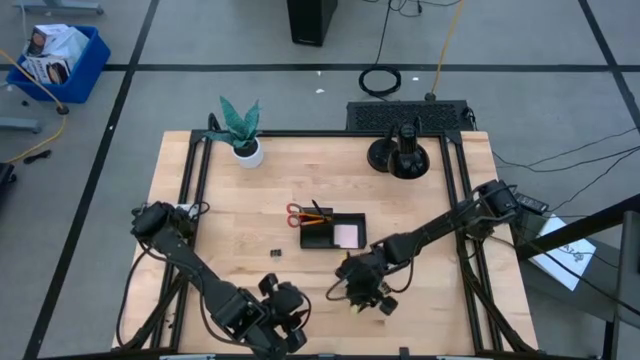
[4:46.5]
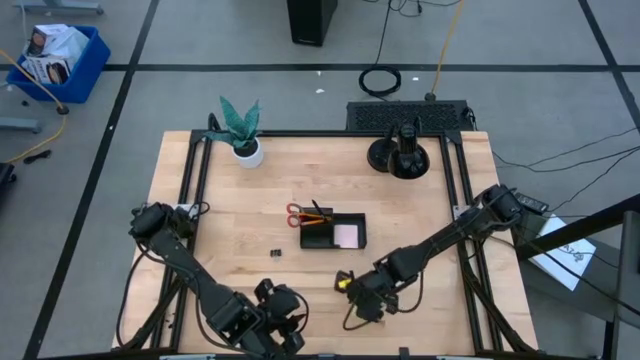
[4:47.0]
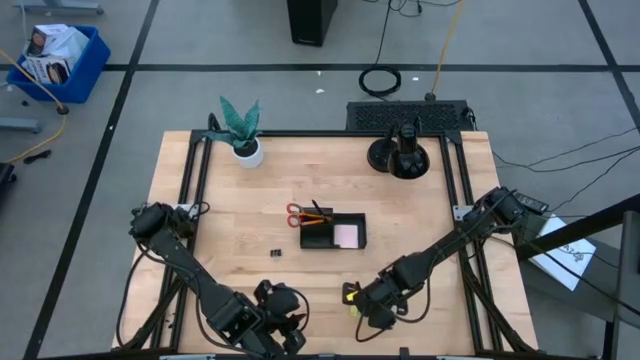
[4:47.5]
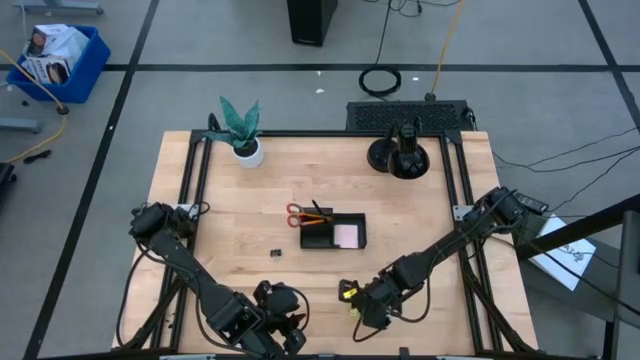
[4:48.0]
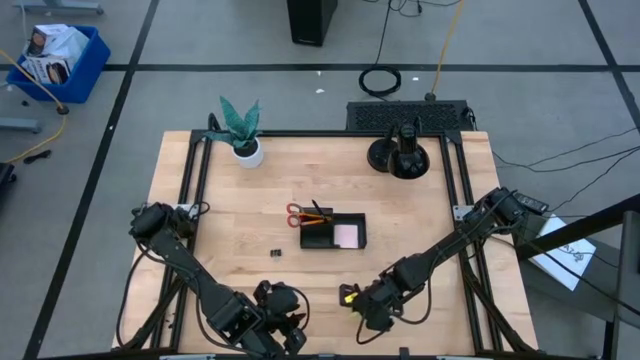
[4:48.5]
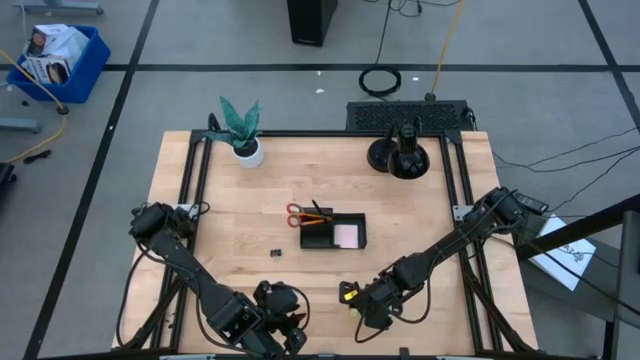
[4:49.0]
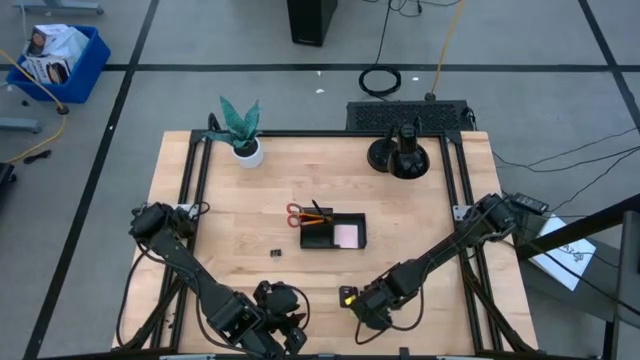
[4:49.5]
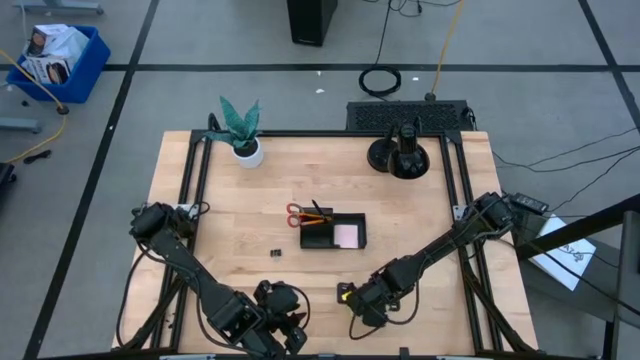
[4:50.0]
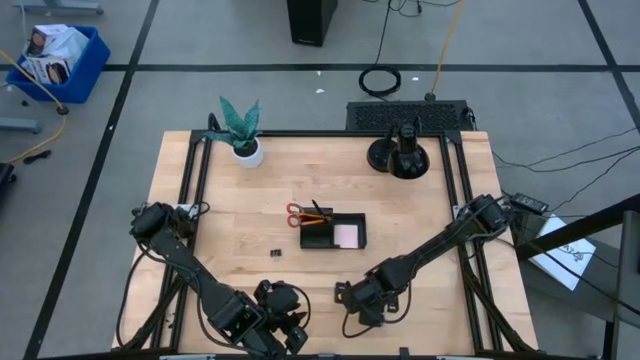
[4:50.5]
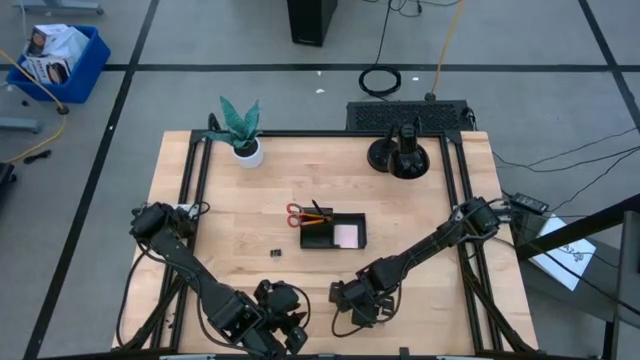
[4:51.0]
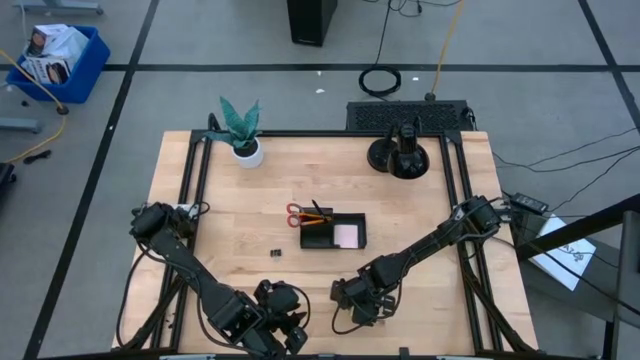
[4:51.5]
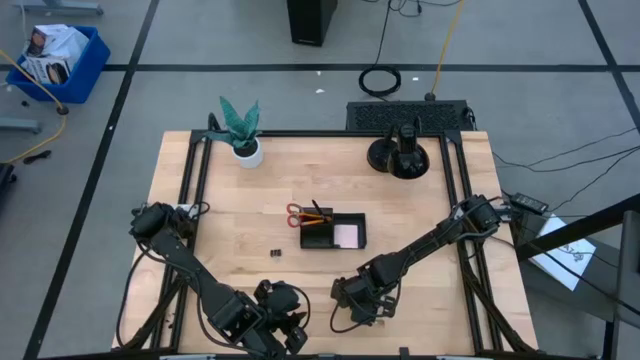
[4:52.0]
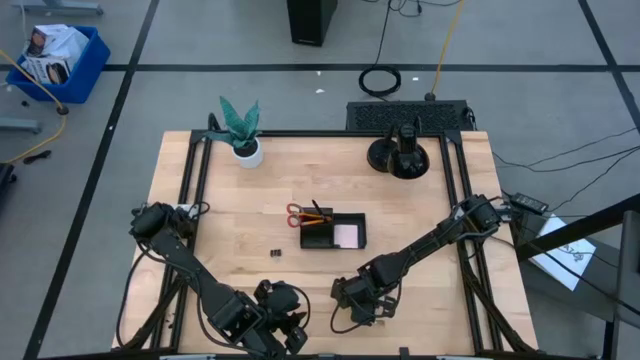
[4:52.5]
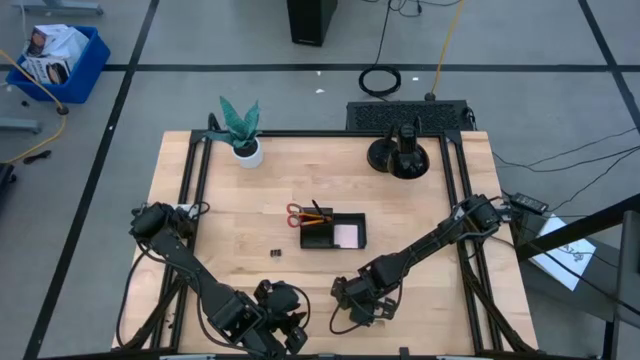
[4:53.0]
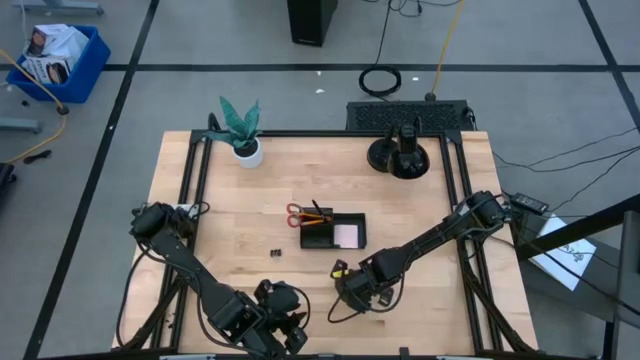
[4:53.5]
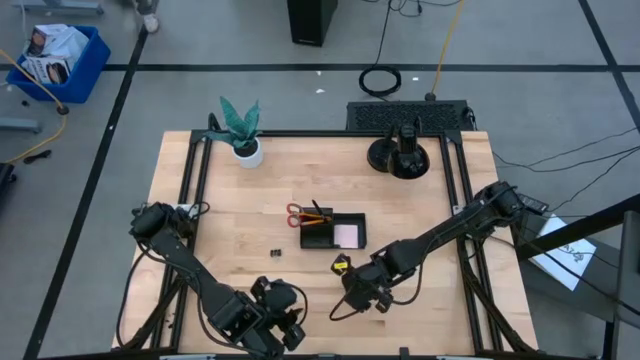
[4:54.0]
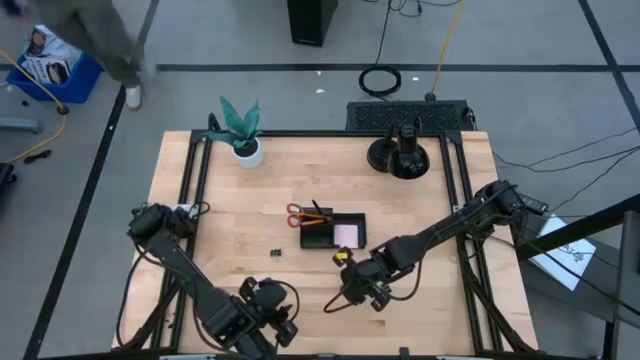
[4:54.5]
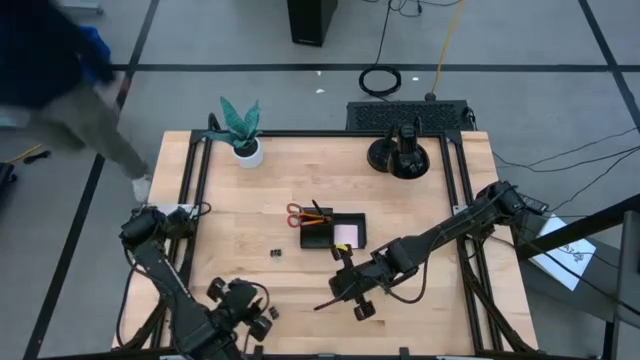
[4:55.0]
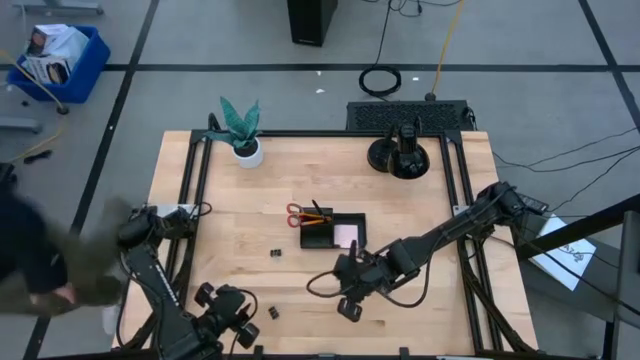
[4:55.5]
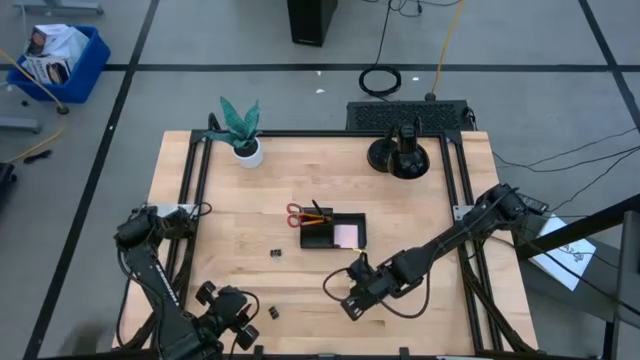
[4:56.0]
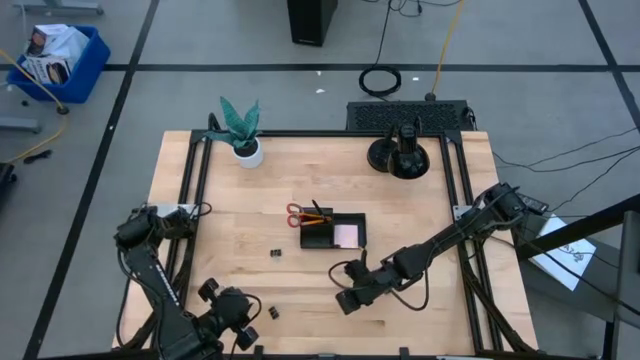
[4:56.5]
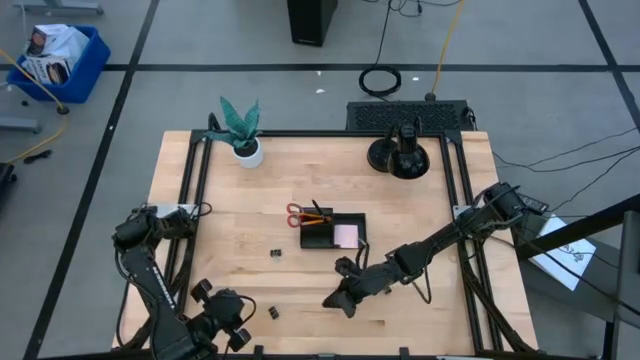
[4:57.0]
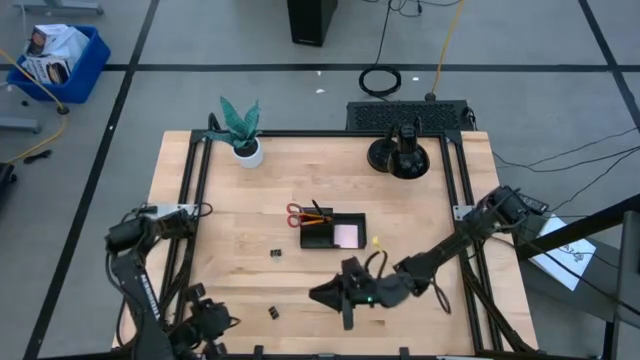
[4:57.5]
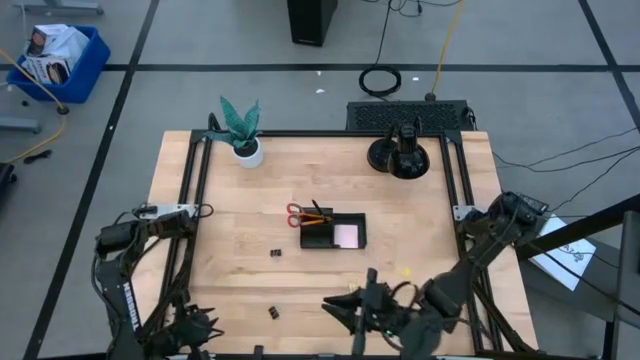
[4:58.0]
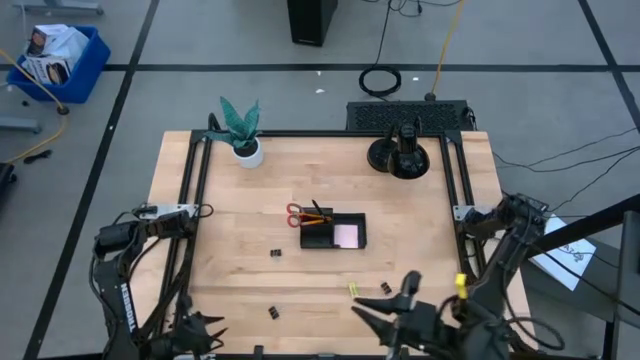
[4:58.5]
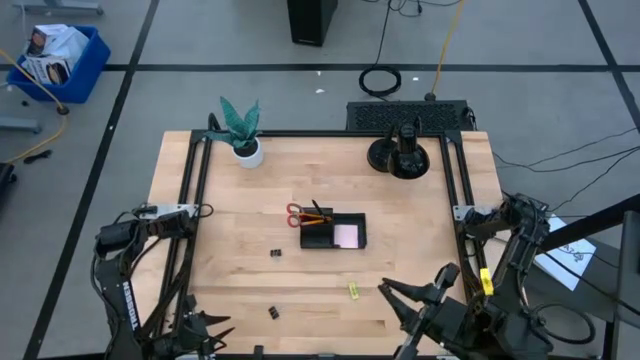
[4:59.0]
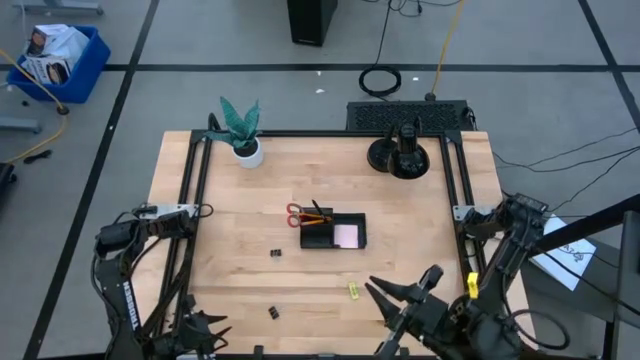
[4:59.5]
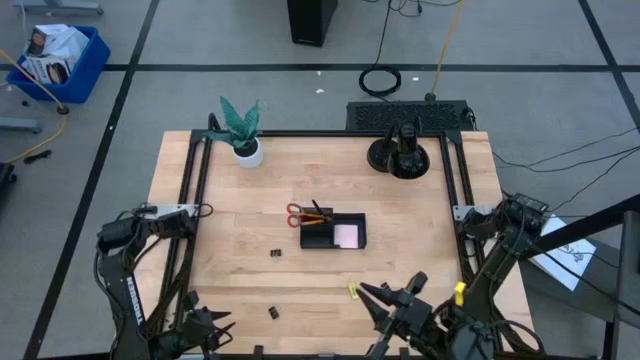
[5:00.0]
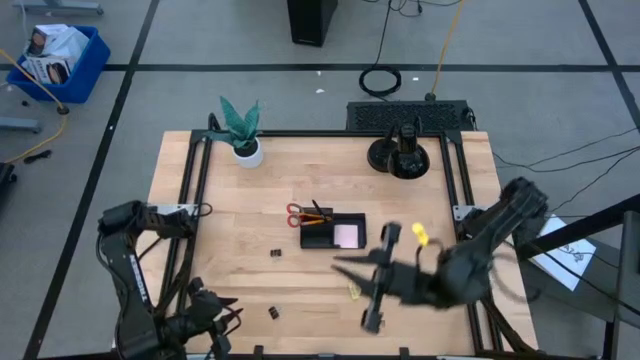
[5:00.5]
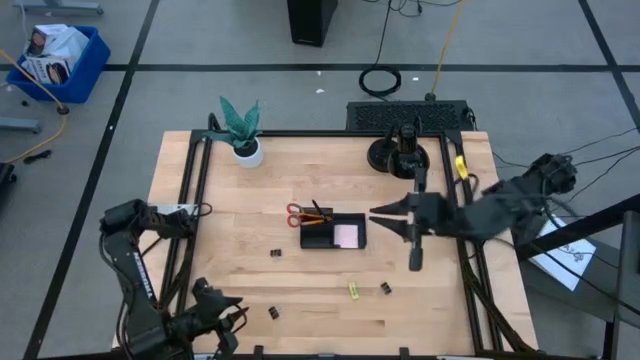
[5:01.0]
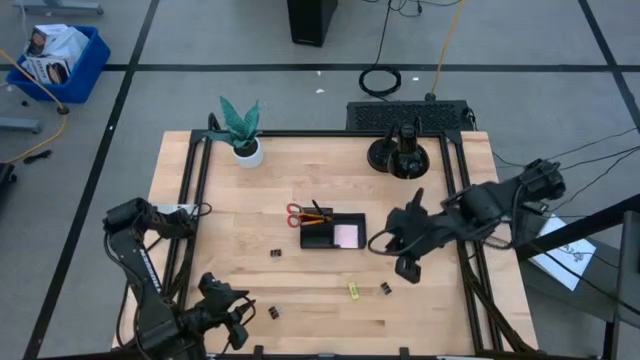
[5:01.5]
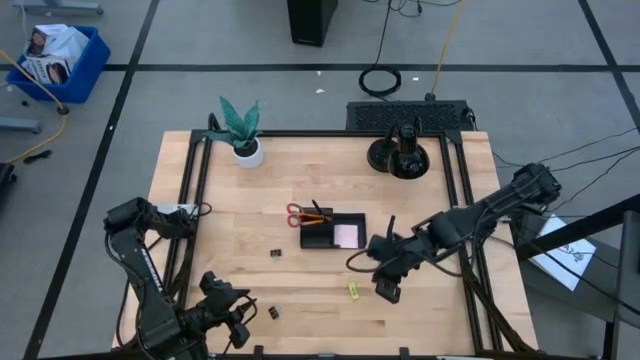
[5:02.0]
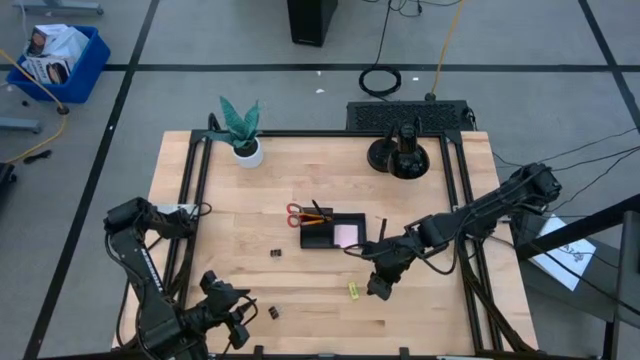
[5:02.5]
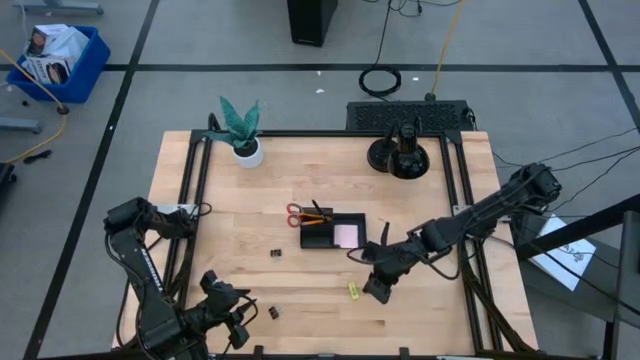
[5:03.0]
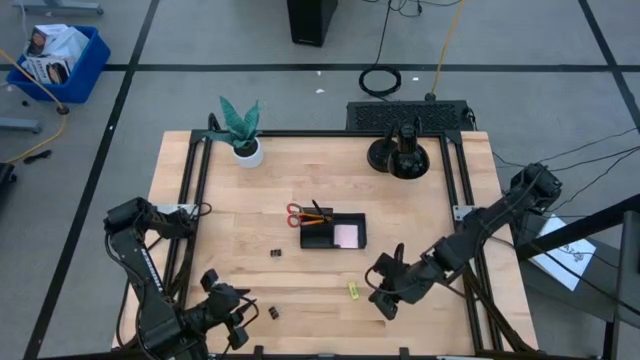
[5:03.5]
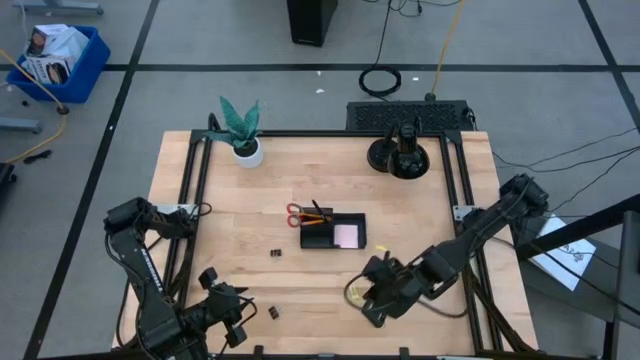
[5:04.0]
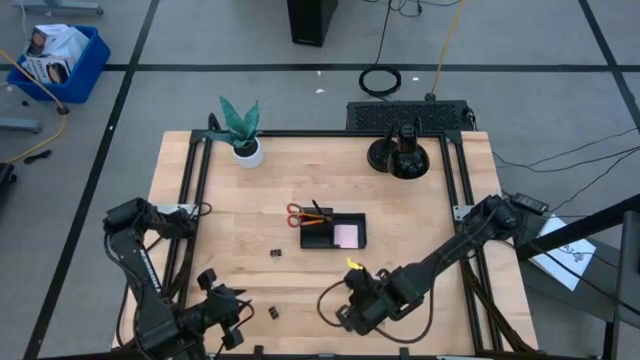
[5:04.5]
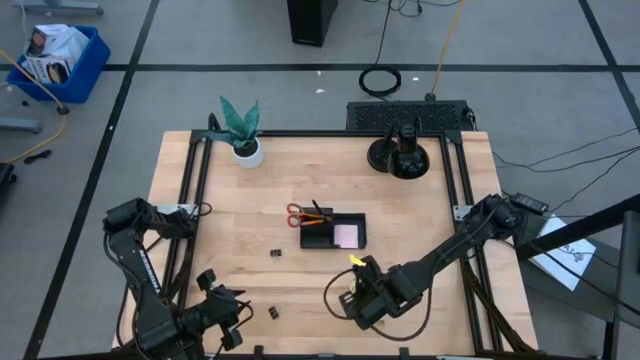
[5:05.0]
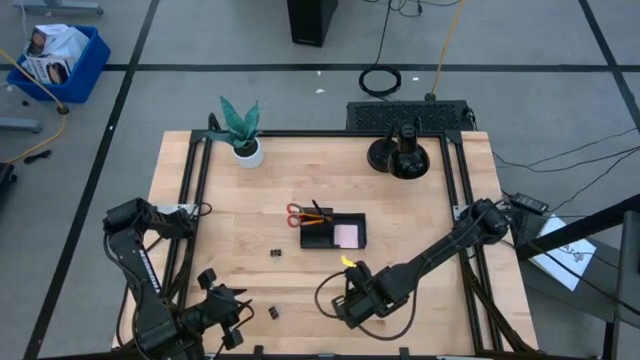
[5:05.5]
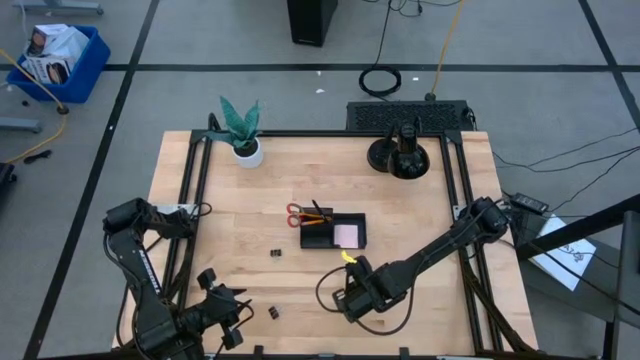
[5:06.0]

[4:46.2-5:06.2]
Task: Pick and place office supplies into organizer
Put the green eraser into the desk organizer

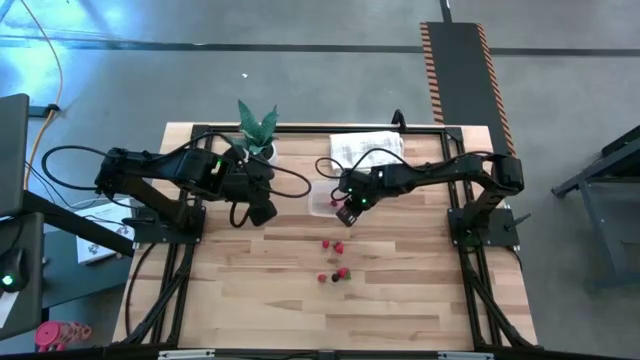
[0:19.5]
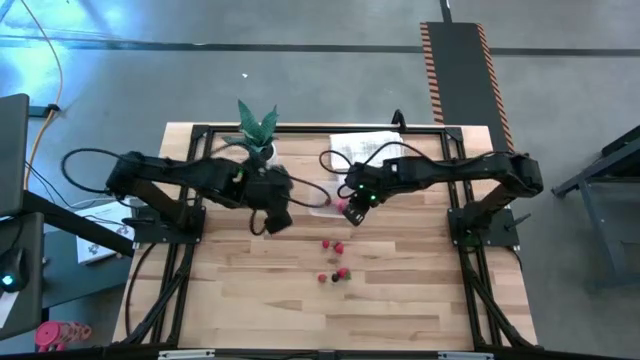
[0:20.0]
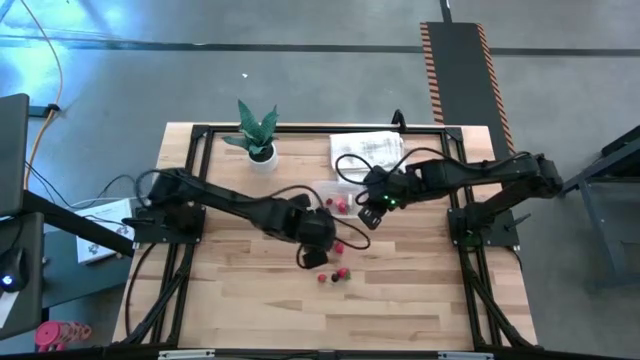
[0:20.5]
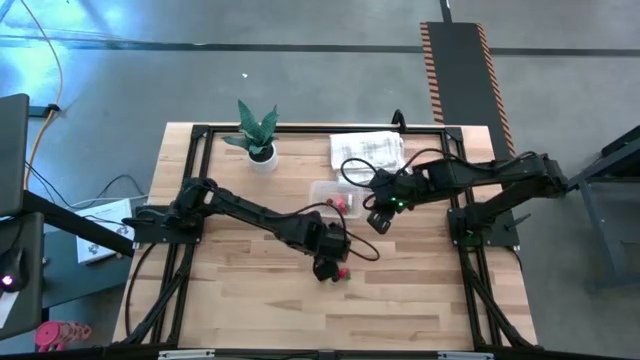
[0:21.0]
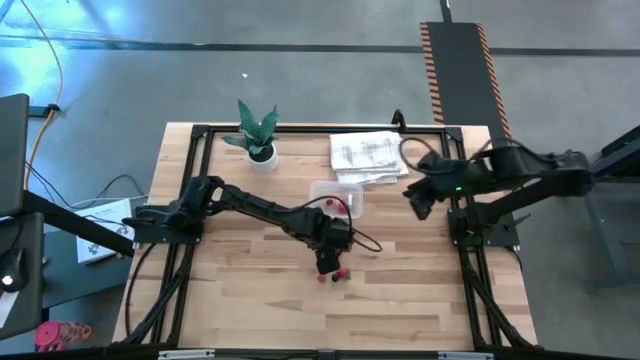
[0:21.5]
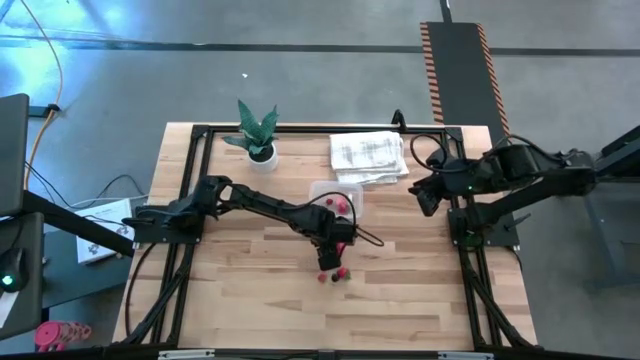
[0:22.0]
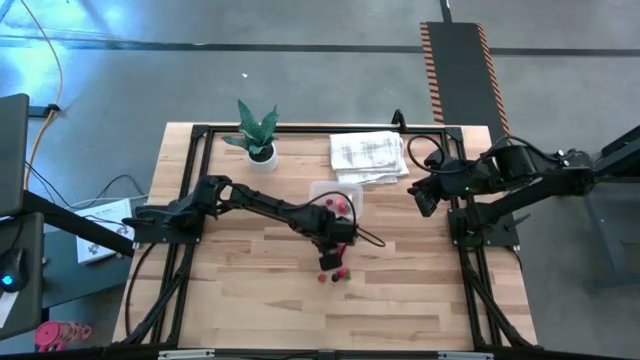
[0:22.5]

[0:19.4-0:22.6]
Task: Pick and placing Produce into tupperware
Put the raspberry into the transparent bin
